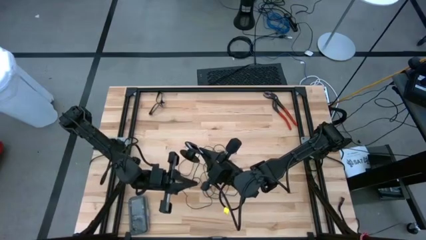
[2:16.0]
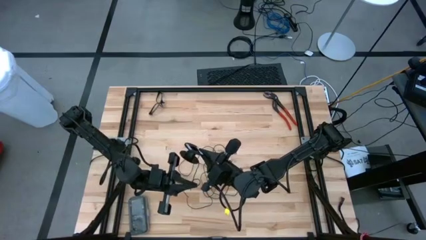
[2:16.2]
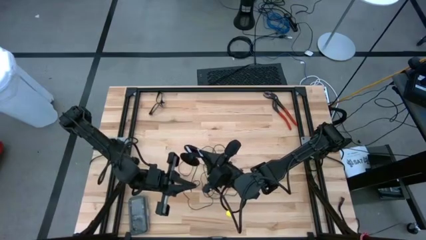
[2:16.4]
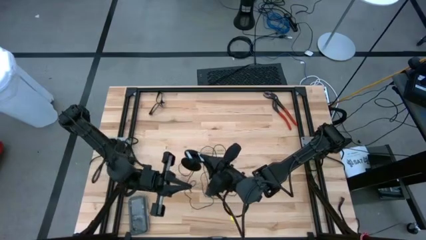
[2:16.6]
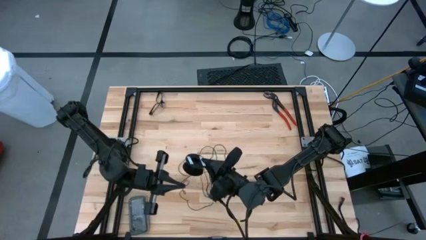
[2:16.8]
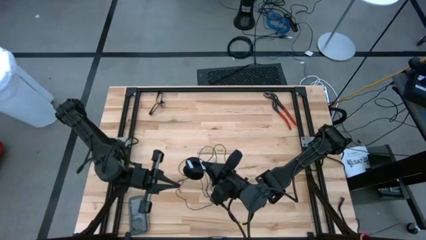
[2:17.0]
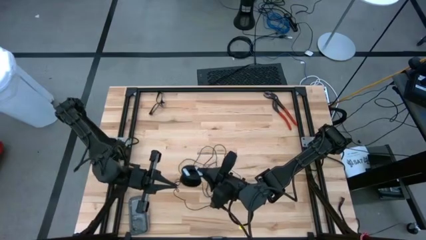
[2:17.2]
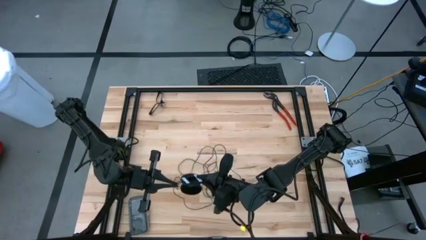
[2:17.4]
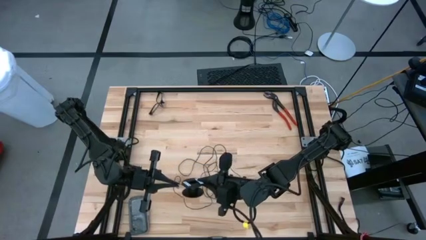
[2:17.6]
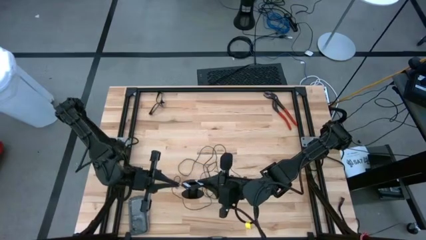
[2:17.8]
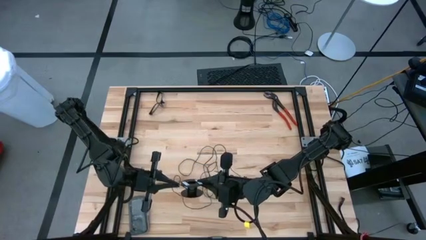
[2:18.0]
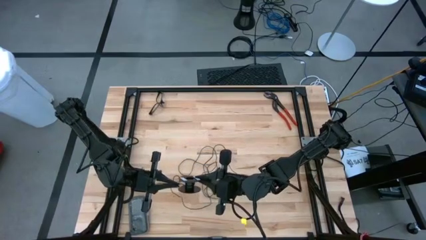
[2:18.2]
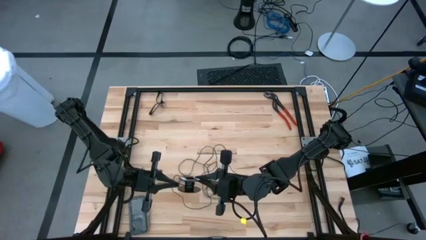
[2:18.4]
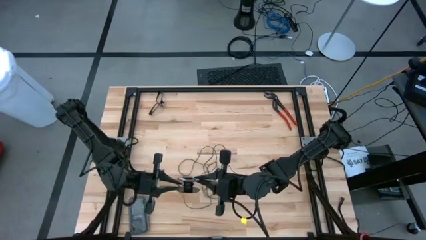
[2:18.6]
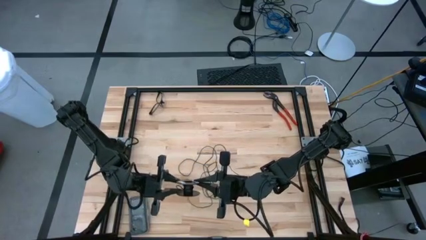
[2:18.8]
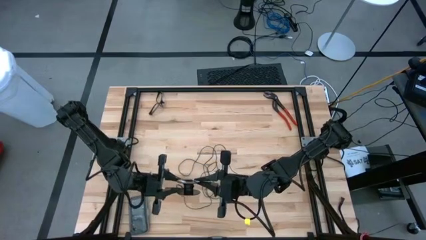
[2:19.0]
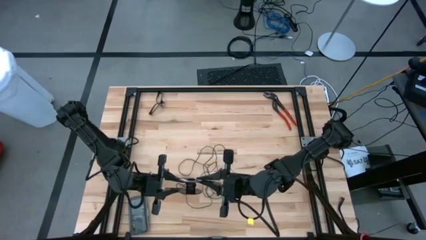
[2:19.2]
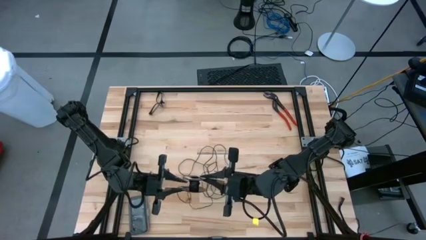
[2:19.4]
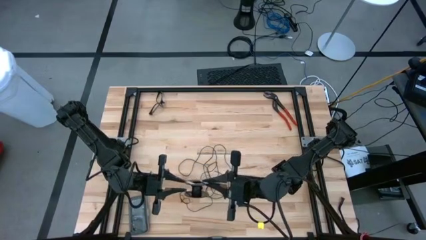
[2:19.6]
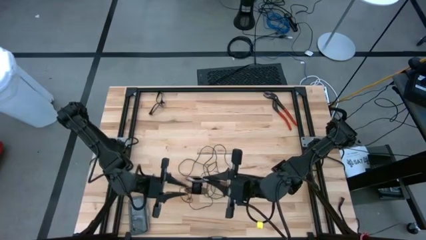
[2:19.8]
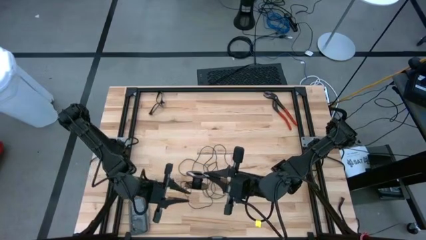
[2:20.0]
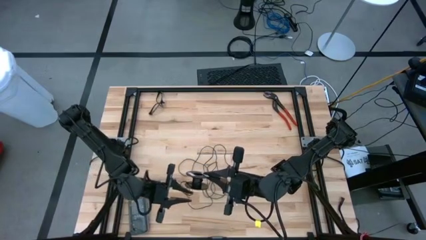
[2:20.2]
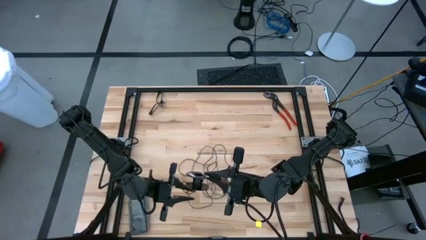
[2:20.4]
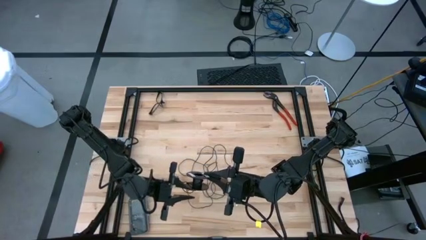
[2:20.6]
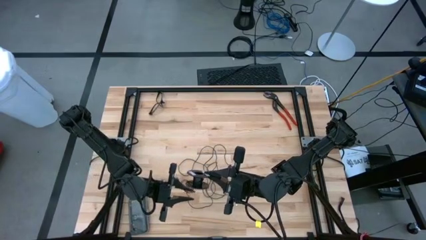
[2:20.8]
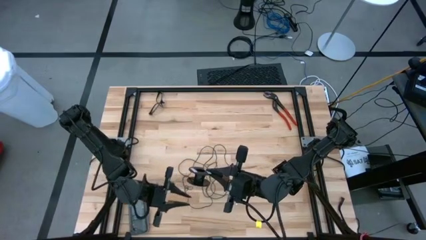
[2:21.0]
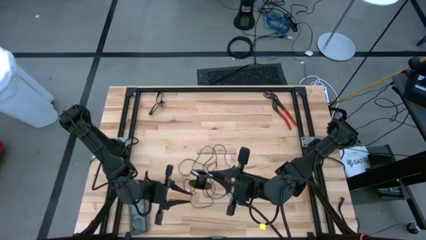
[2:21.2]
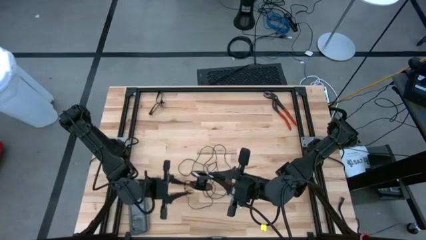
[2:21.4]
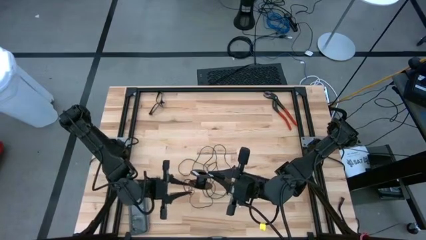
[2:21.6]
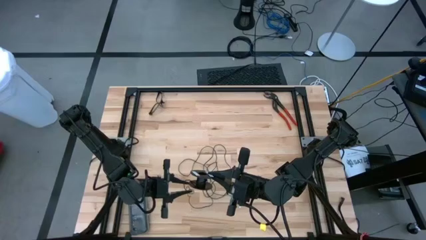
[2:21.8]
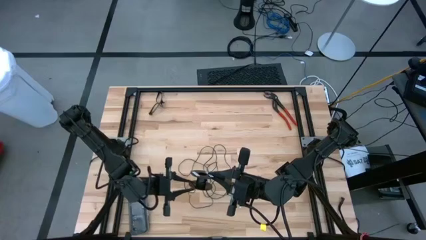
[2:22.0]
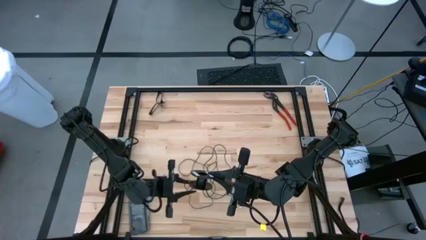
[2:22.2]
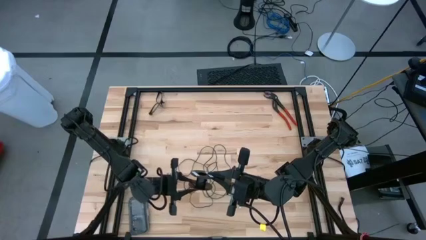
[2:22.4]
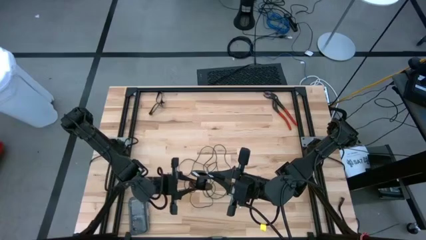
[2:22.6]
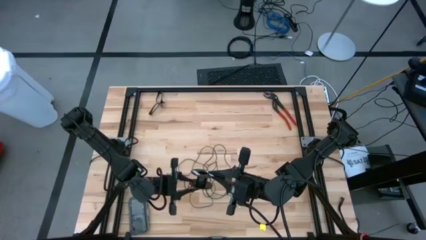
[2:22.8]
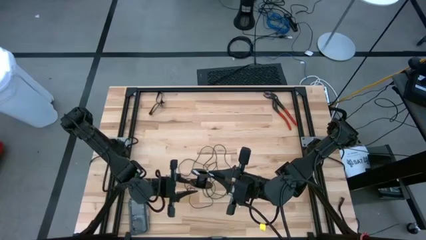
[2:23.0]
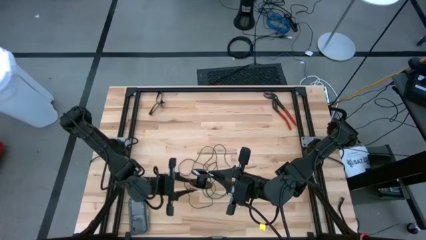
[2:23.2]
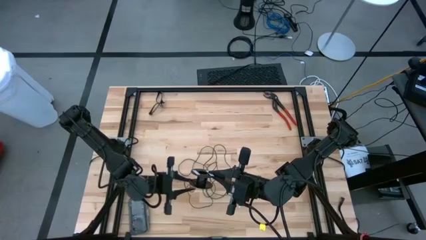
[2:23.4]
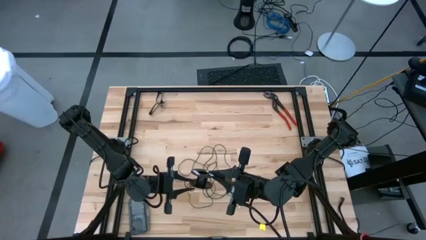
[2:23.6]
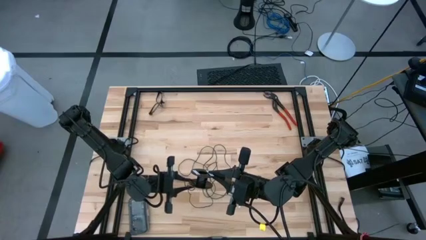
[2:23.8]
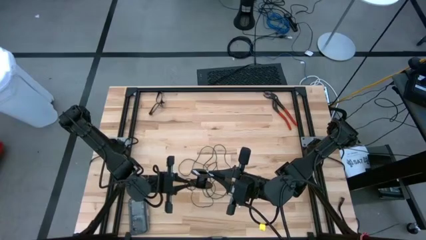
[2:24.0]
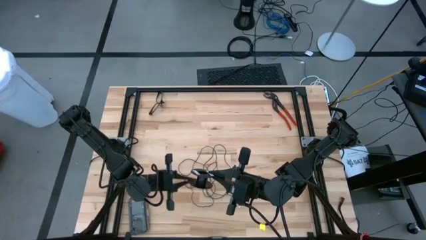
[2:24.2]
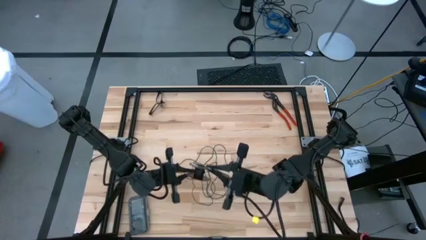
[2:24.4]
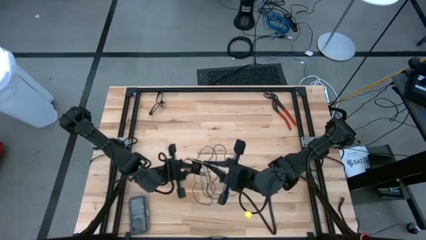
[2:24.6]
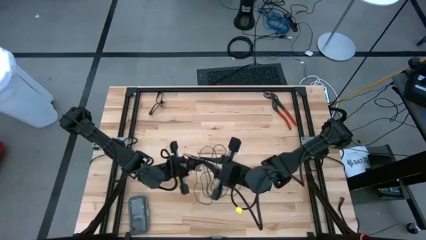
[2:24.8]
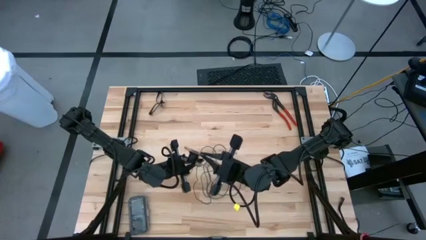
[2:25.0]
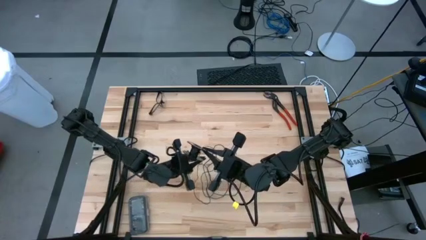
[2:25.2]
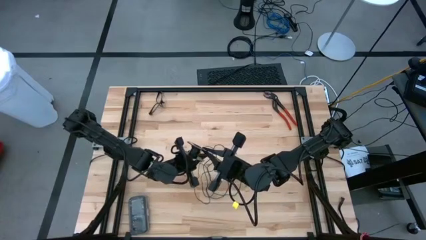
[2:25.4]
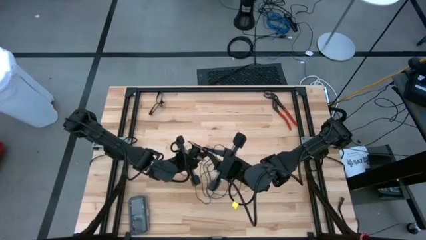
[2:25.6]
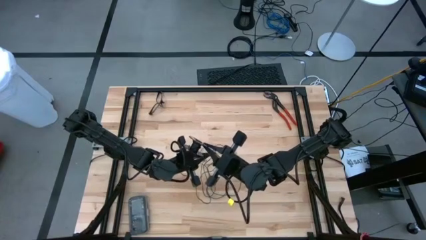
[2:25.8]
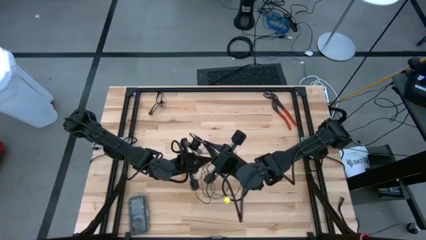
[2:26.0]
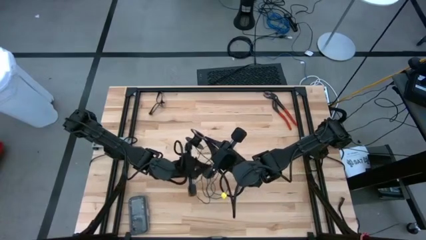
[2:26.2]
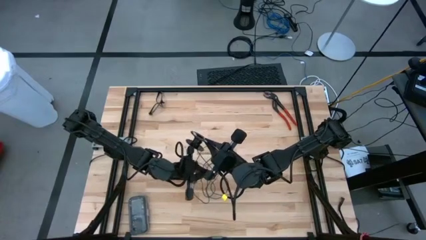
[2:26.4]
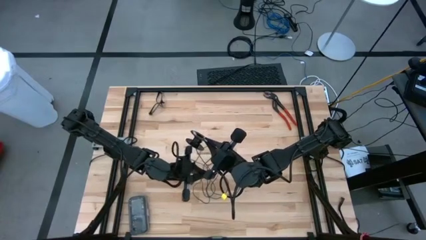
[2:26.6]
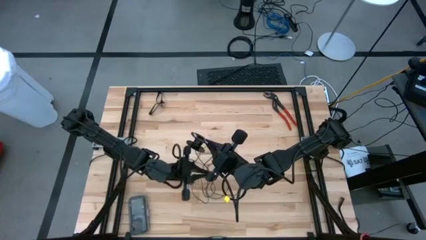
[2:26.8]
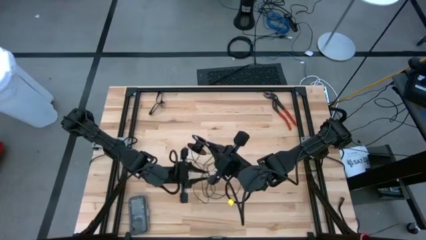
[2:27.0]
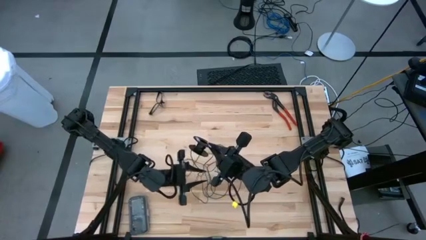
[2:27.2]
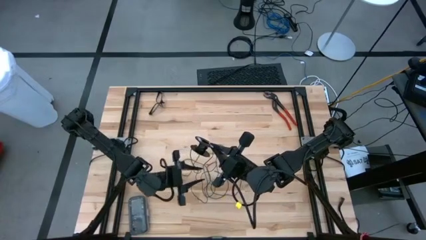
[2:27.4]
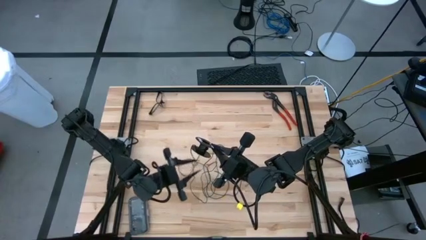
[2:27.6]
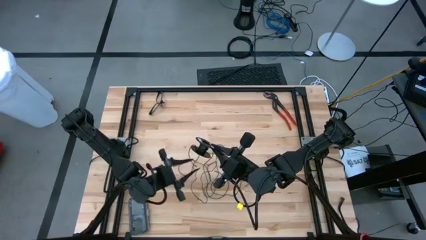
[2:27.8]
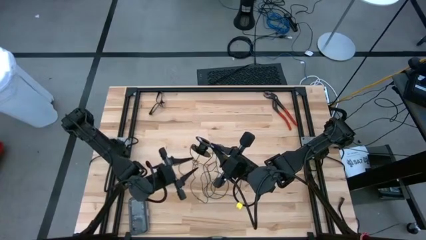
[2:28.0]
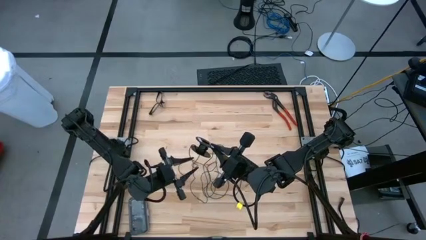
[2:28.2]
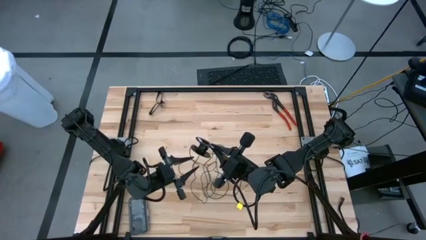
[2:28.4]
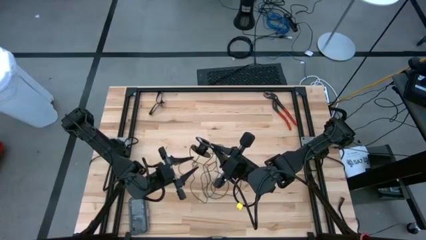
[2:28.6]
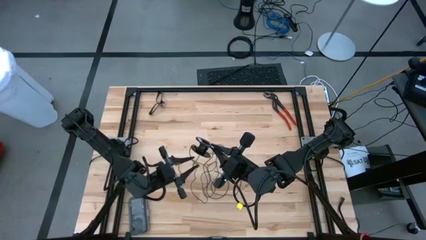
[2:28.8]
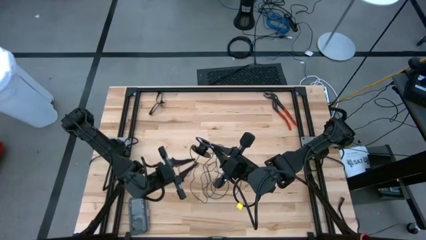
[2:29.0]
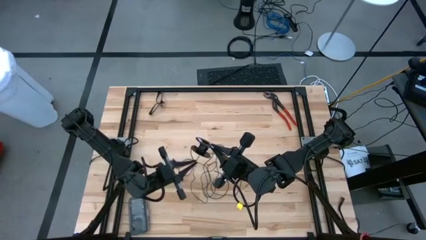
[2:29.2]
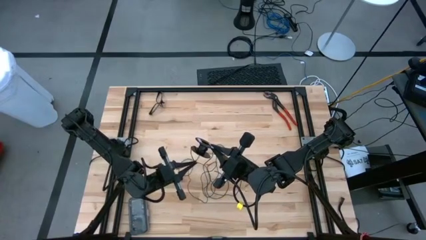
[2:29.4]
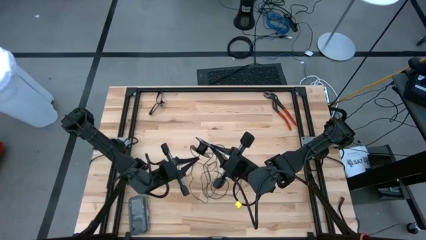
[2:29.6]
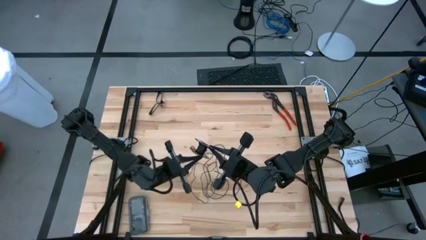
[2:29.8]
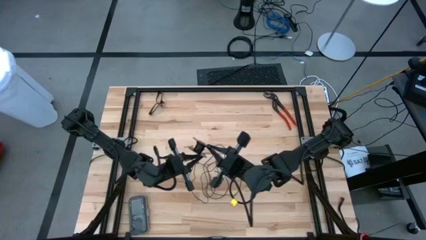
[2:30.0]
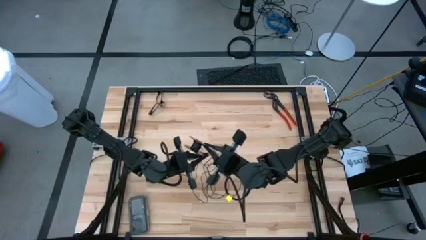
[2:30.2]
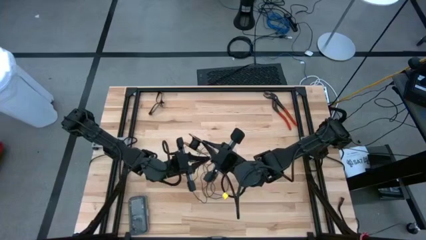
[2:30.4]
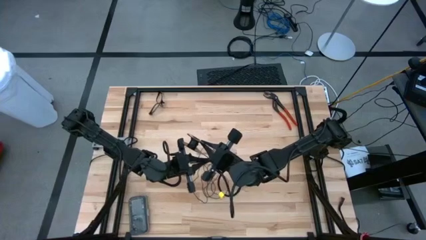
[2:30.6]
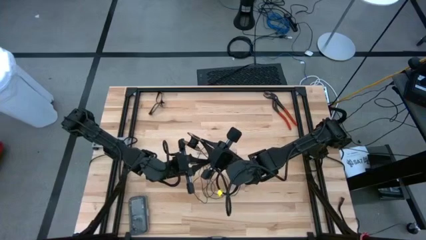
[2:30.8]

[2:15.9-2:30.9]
Task: Coil cords
Coil the black wire onto the spool

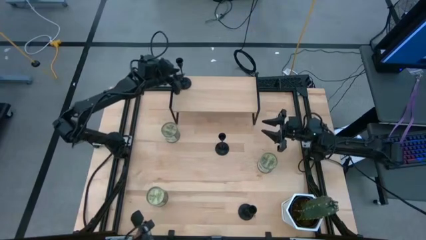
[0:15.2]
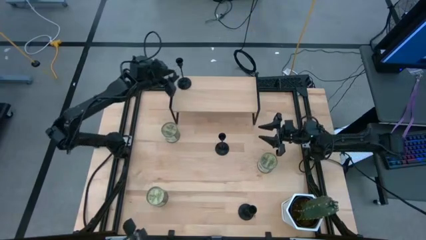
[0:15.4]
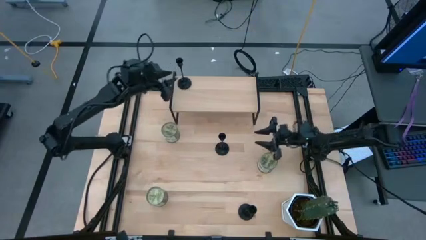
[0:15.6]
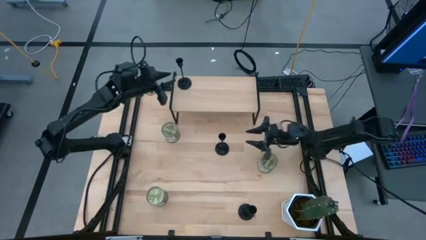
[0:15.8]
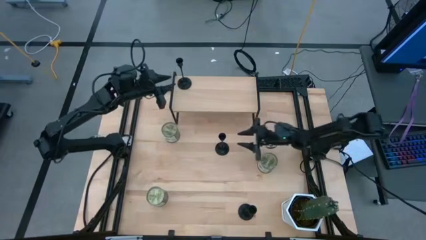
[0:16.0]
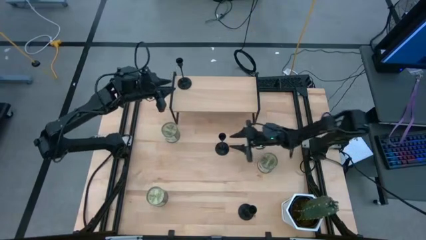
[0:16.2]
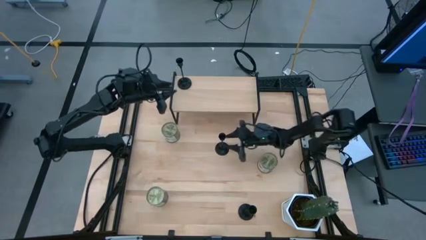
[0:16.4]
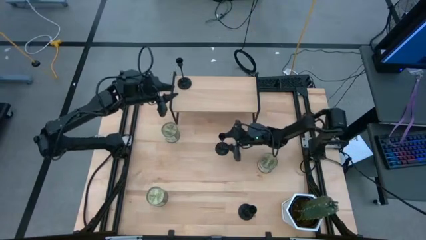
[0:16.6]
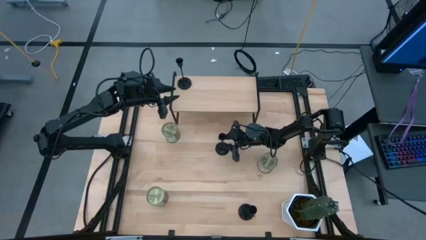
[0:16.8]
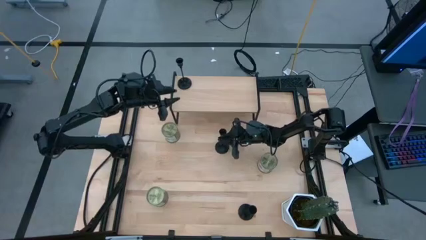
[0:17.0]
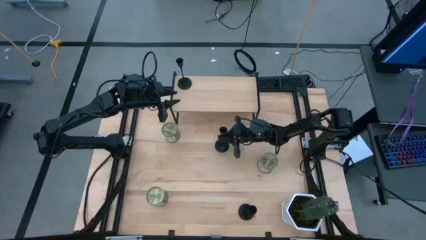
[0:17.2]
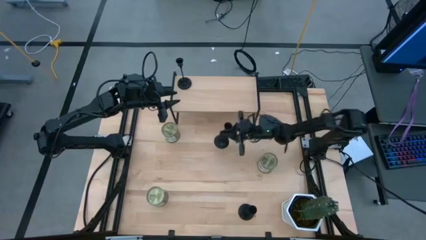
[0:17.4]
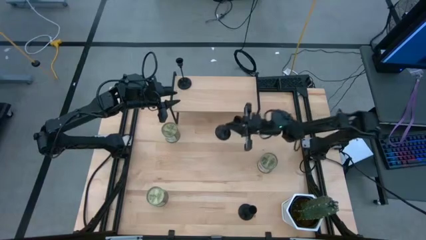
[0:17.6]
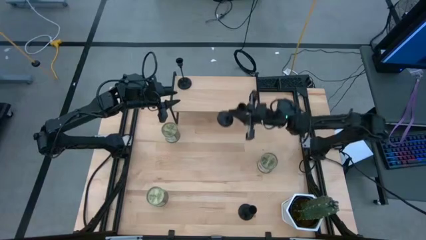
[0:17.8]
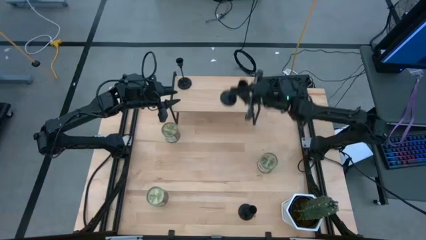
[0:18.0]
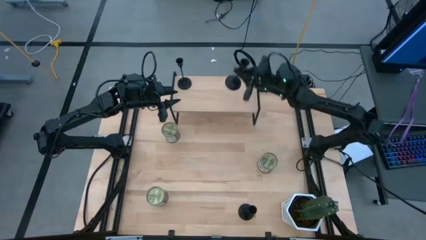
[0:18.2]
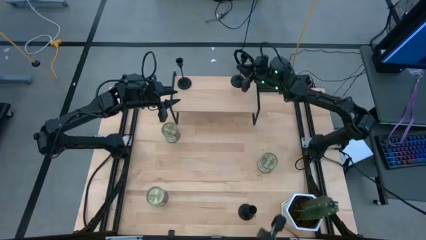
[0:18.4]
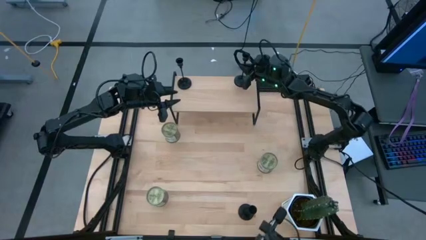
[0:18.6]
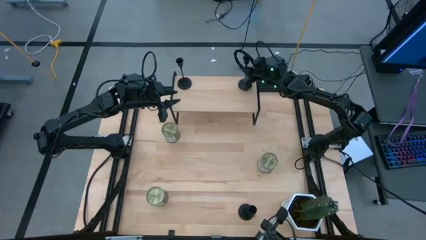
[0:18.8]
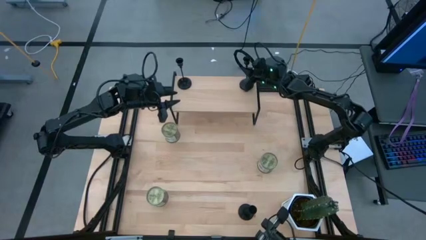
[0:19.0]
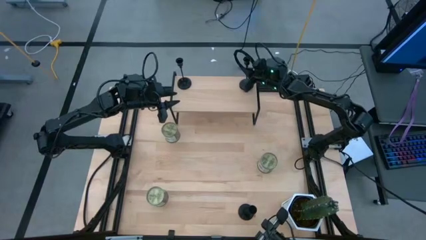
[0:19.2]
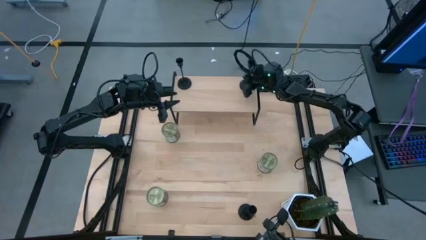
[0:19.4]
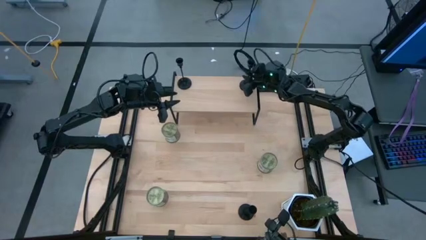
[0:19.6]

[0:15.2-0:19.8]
Task: Pick & Place candle stick holders
Put the top black candle holder on the shelf
